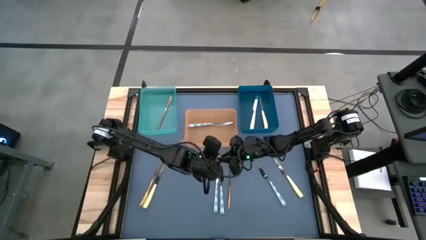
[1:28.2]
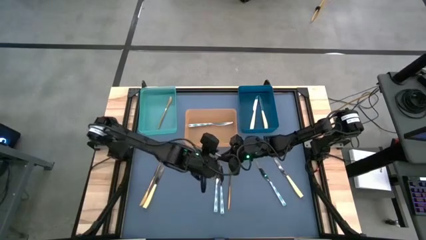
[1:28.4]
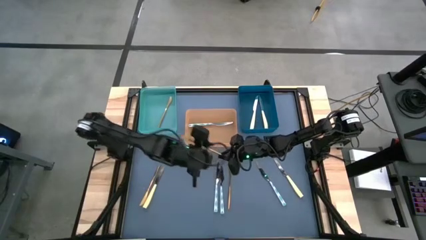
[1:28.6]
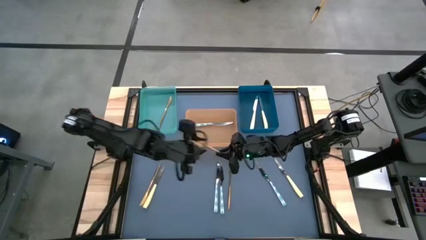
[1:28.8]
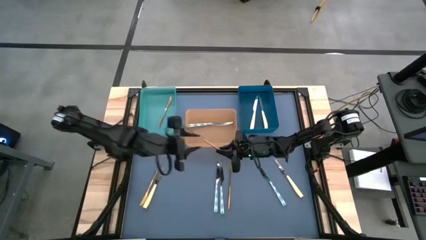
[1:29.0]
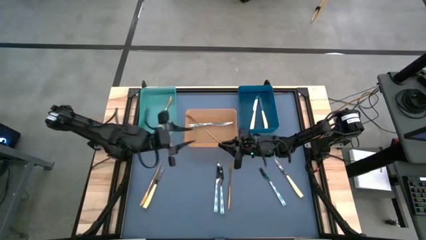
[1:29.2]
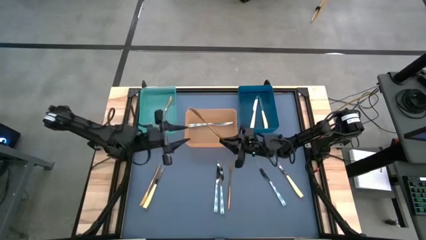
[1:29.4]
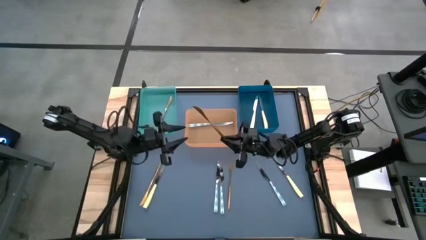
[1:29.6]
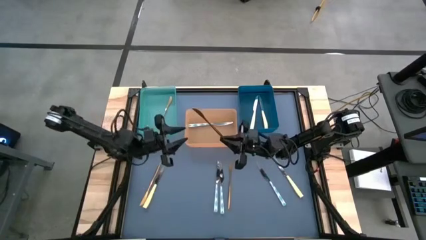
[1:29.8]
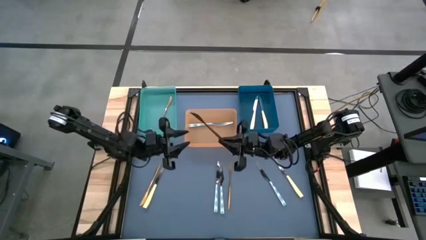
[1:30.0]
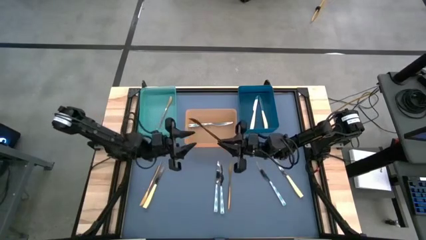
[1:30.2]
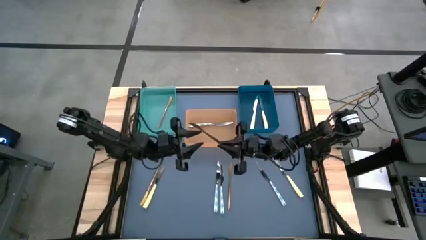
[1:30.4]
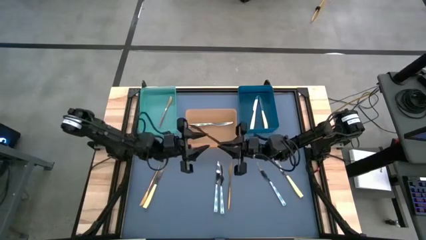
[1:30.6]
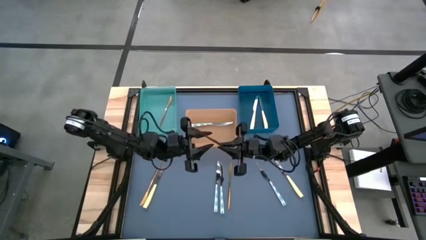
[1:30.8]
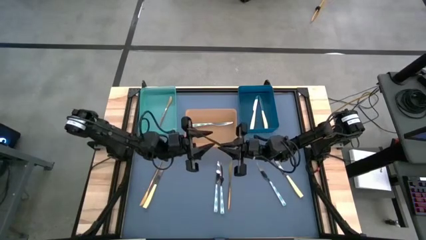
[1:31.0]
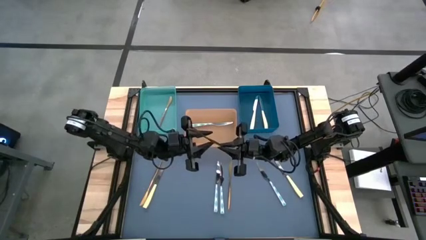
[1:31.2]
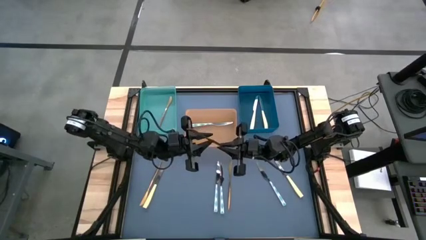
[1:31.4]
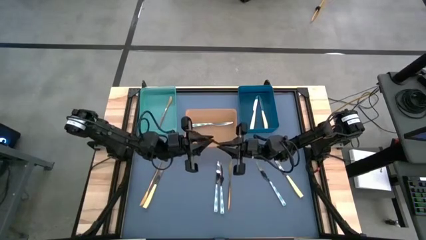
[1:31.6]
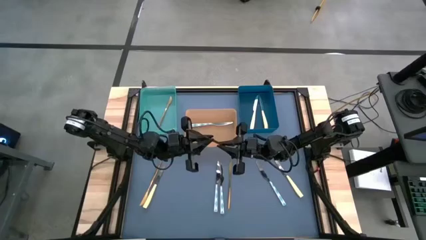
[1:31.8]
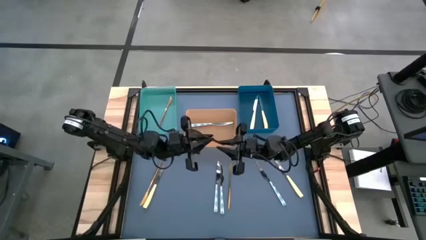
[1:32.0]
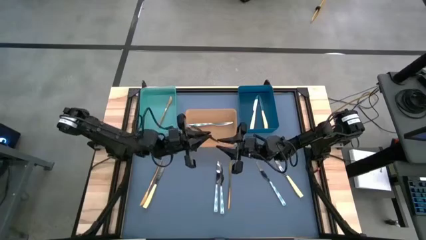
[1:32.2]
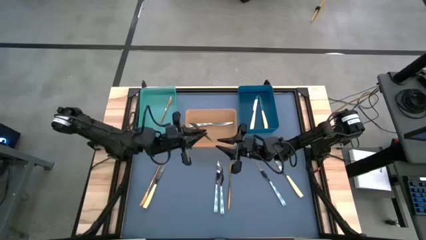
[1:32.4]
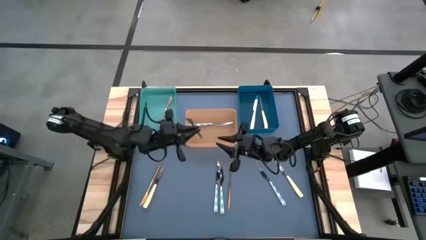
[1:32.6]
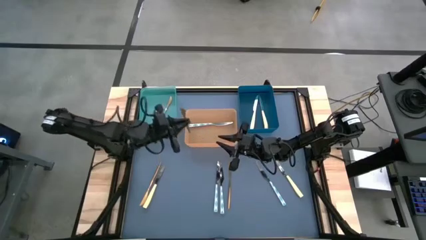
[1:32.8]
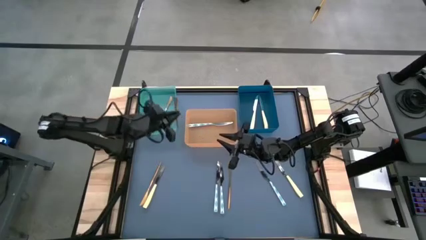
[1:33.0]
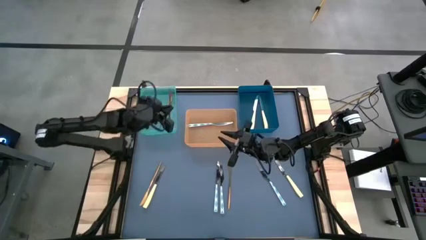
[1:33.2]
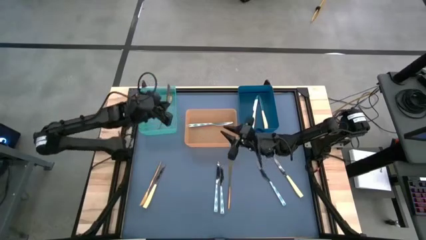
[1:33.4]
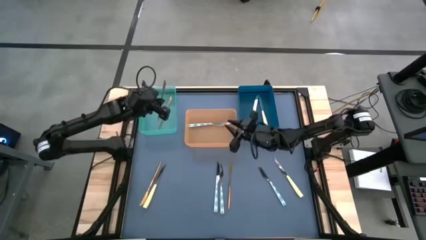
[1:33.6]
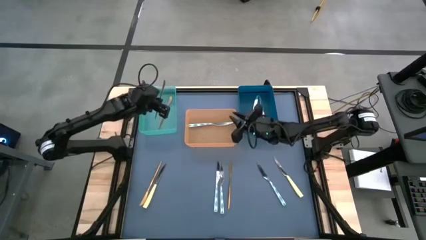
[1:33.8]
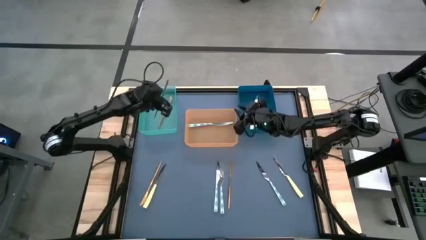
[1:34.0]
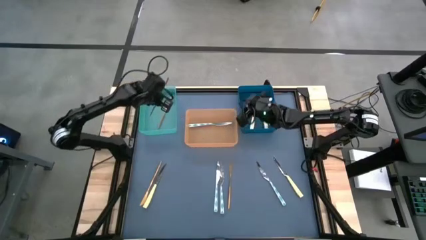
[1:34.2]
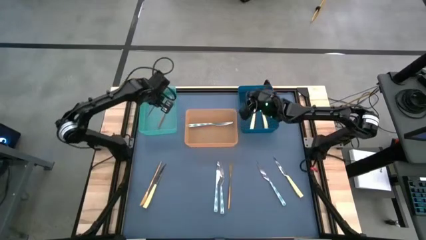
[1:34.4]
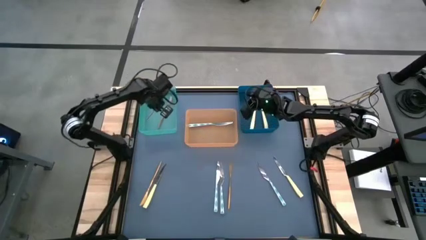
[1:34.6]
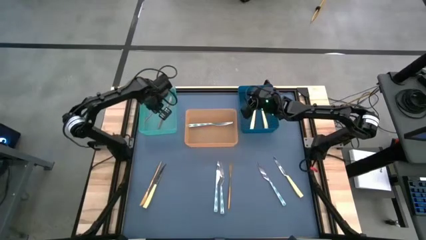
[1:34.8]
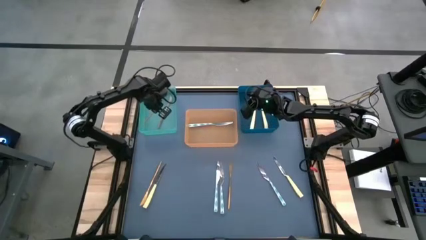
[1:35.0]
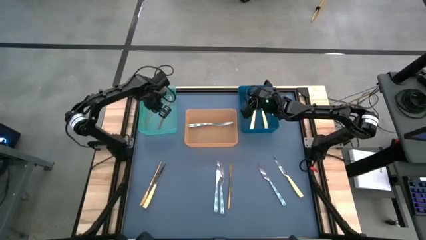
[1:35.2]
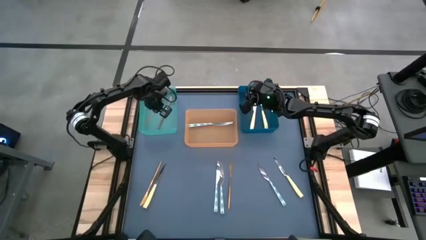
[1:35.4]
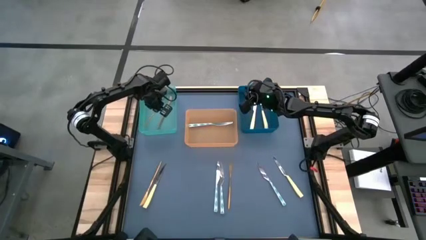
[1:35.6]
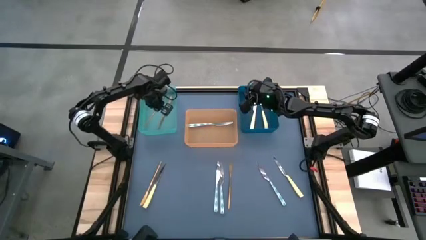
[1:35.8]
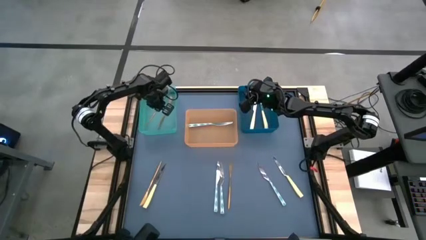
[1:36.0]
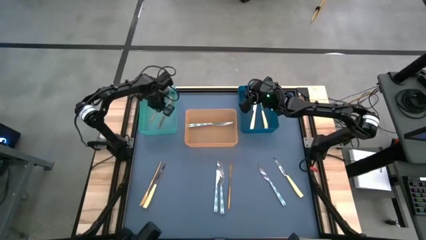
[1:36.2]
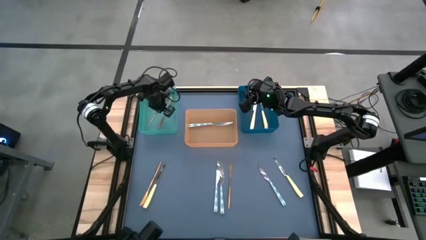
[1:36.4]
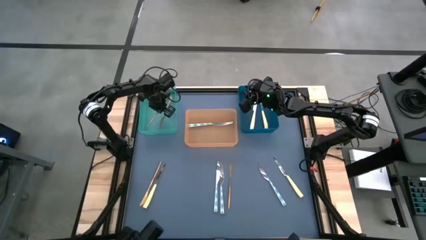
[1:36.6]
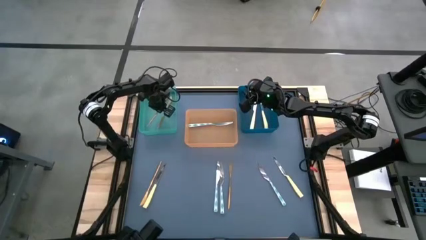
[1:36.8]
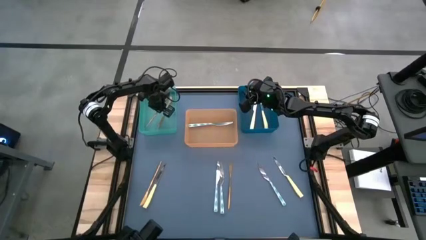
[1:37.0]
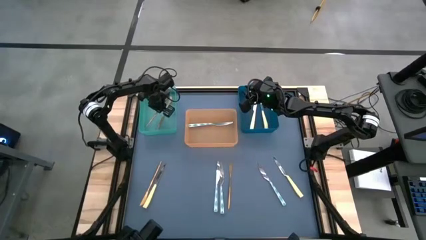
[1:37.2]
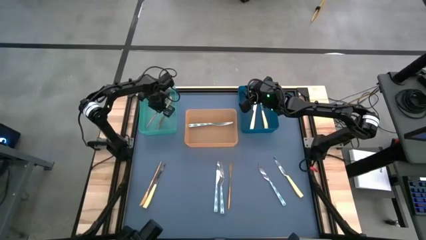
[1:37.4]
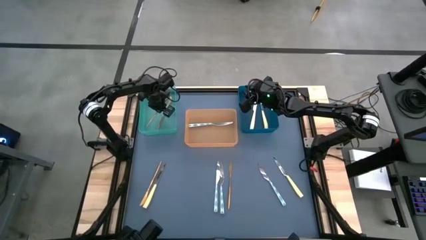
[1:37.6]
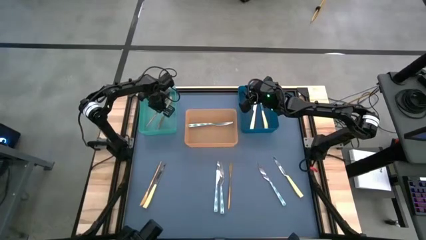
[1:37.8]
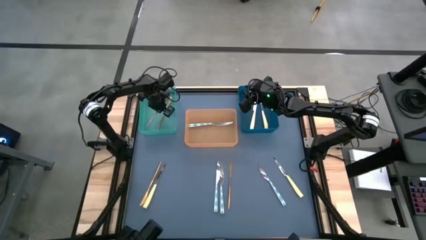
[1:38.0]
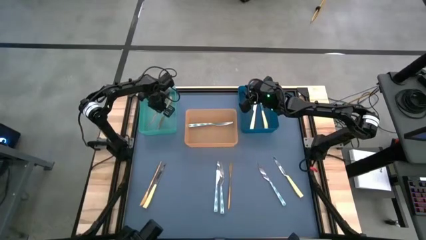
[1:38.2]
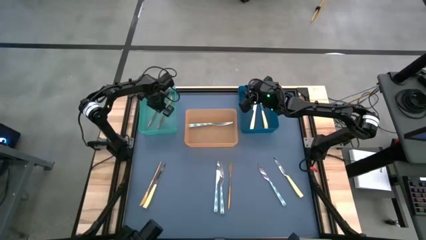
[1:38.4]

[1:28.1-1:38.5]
Task: Sort silverware by color (type)
Put the gold knife into the green bin

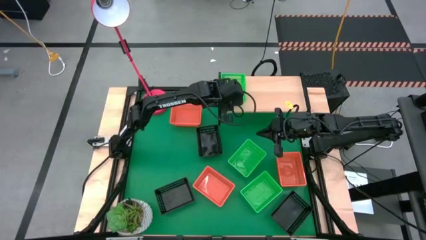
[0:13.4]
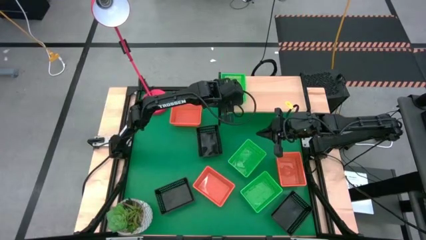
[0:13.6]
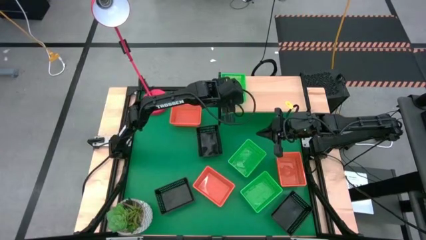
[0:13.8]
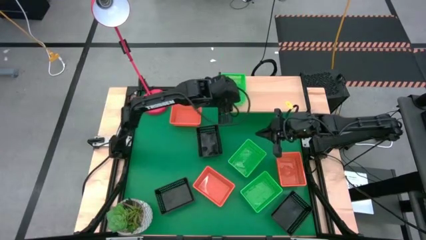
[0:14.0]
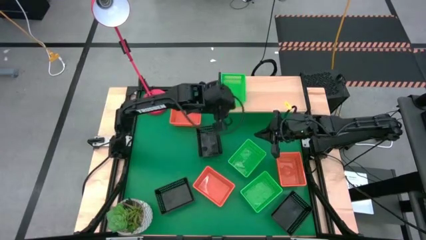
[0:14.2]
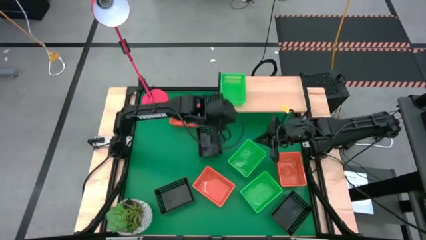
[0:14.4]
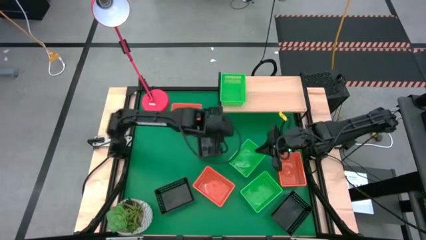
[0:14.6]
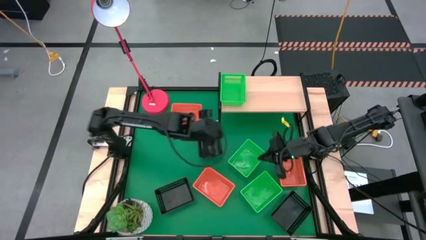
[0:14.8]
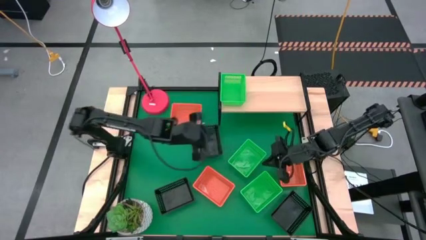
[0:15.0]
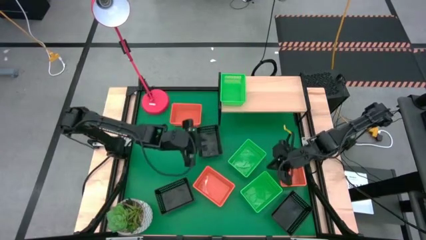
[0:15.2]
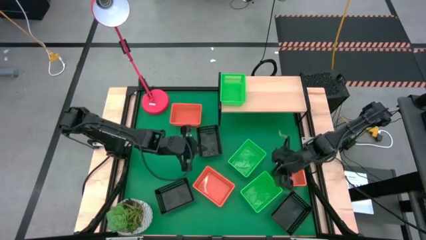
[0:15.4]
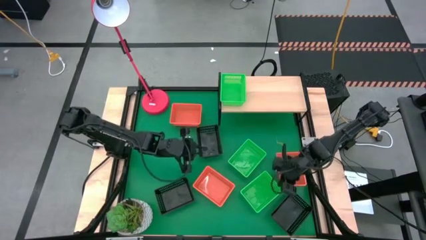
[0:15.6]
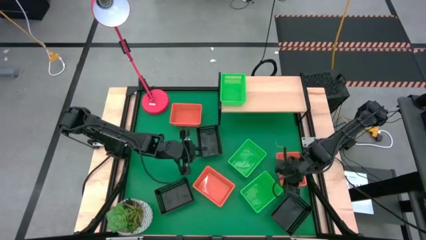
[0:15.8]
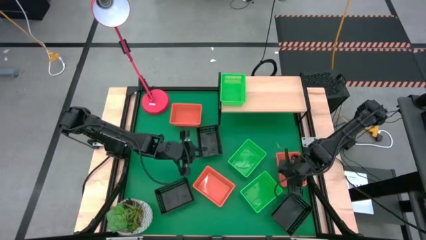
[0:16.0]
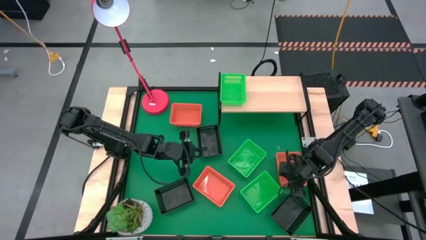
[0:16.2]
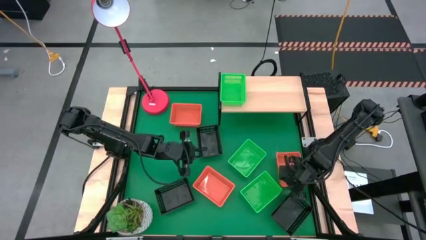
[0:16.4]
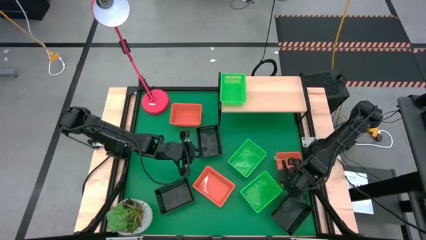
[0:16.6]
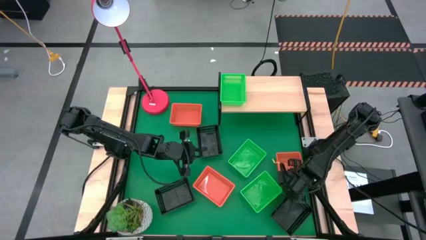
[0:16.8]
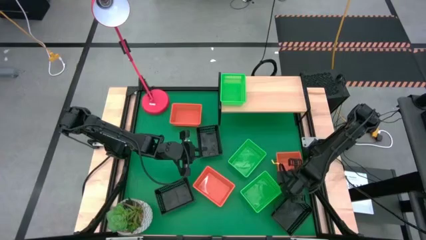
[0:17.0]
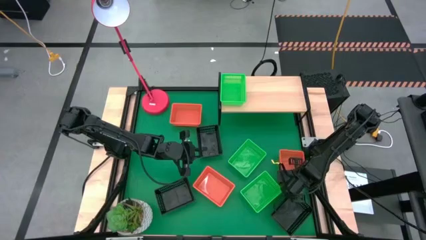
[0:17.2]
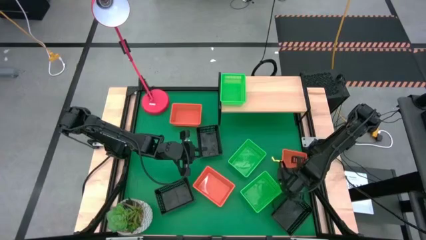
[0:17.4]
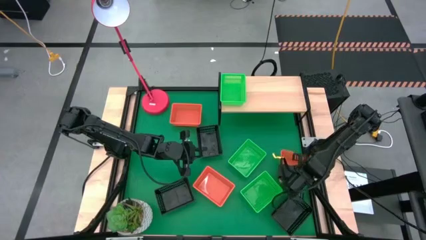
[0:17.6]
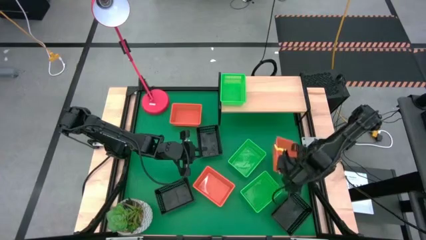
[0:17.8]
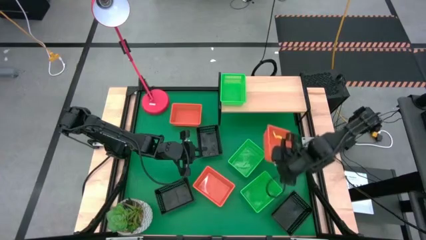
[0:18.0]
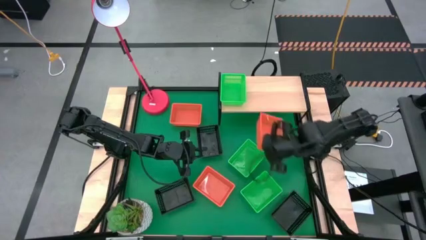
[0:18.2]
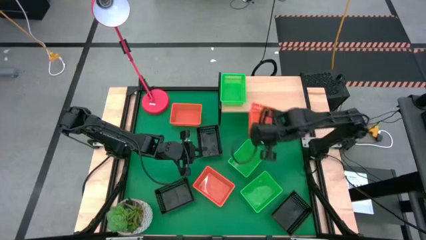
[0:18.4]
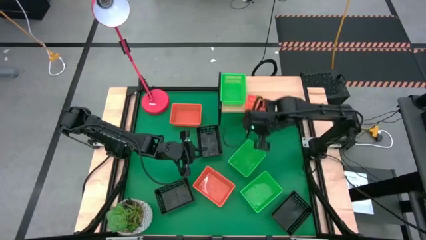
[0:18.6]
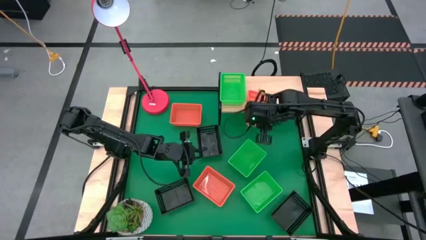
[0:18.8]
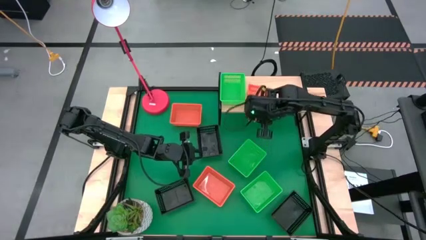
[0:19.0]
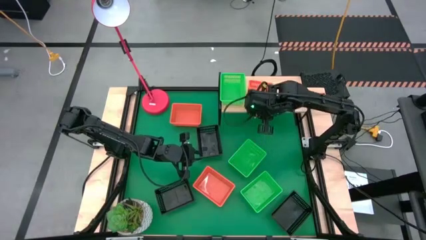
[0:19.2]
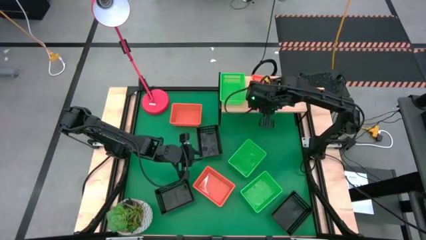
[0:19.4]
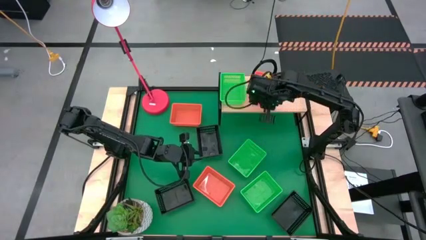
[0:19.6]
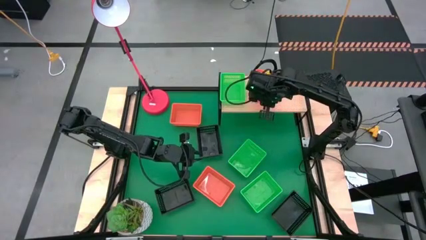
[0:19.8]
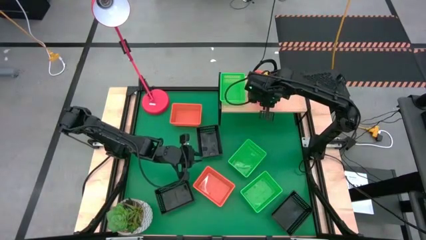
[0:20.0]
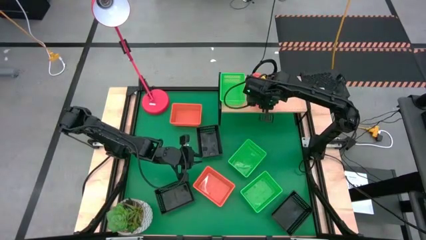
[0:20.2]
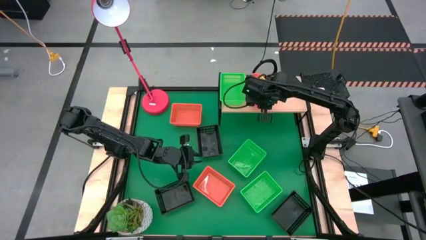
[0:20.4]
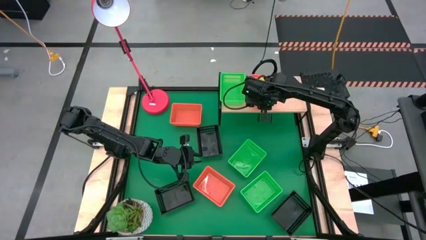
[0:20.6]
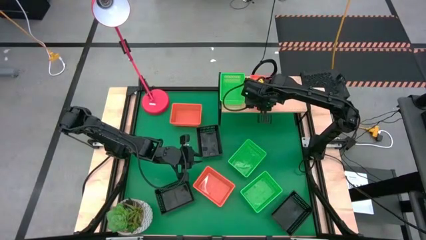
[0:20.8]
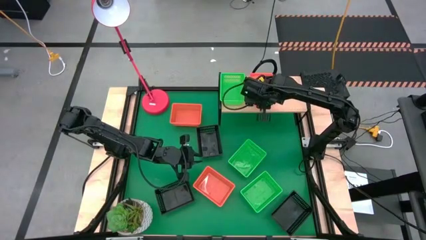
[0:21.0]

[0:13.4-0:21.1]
Task: Stack baskets on shelf by color
Put the middle right orange basket on the shelf
